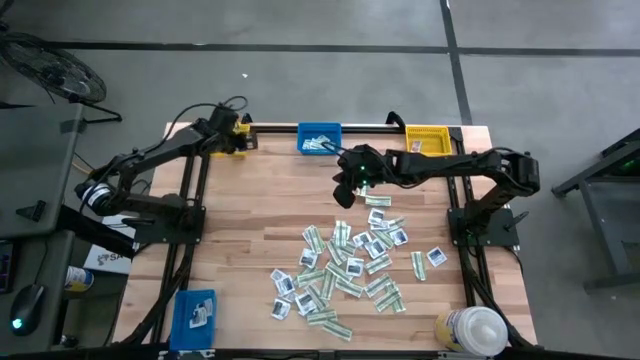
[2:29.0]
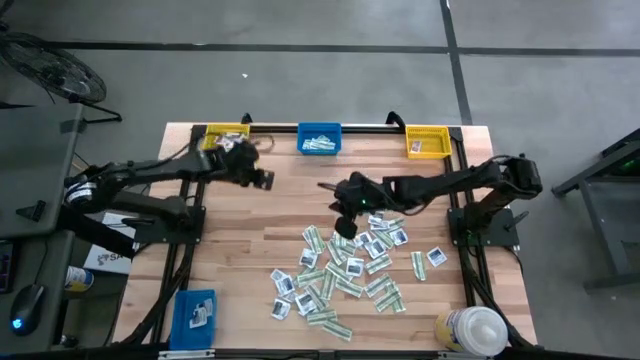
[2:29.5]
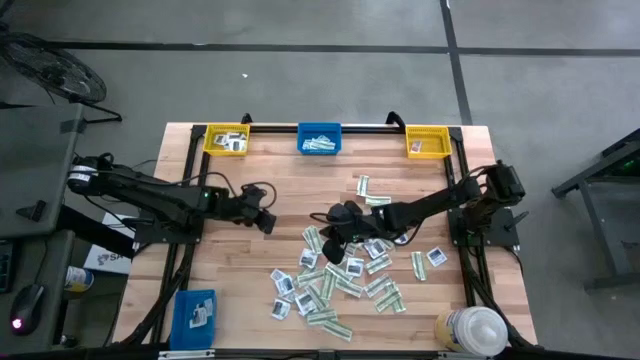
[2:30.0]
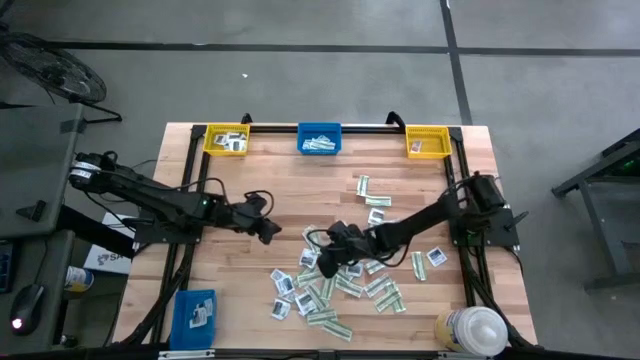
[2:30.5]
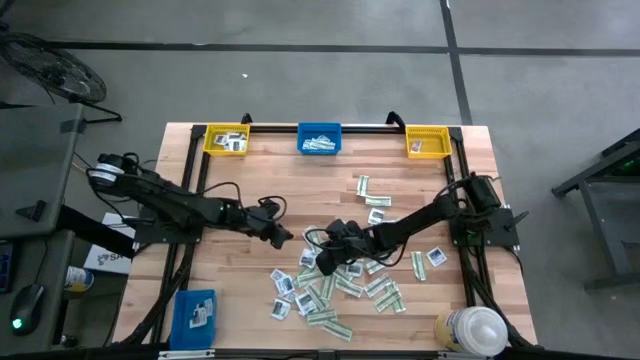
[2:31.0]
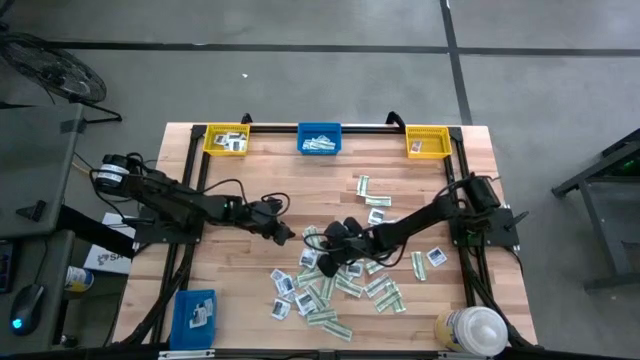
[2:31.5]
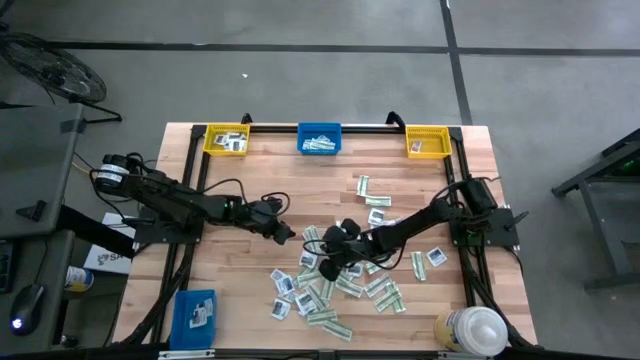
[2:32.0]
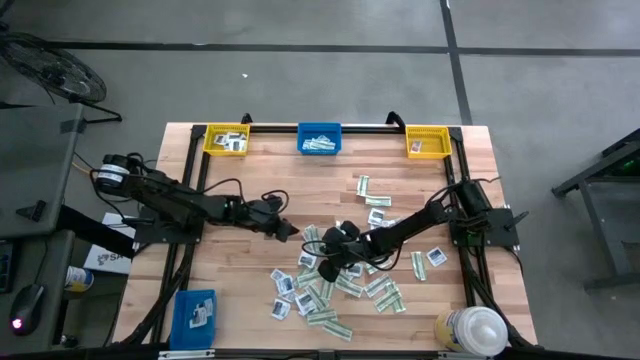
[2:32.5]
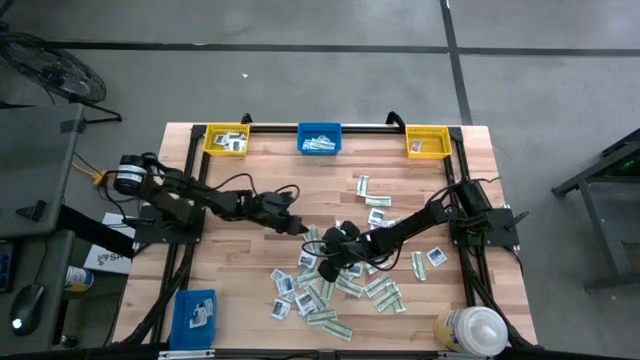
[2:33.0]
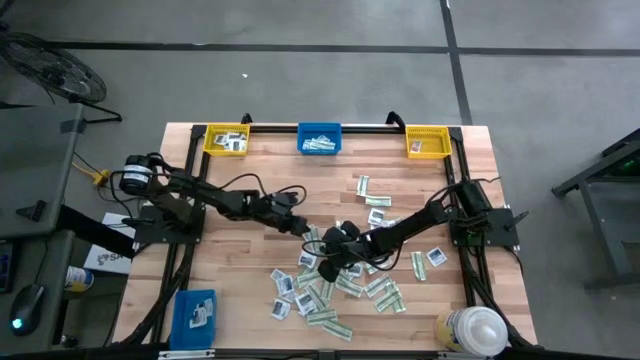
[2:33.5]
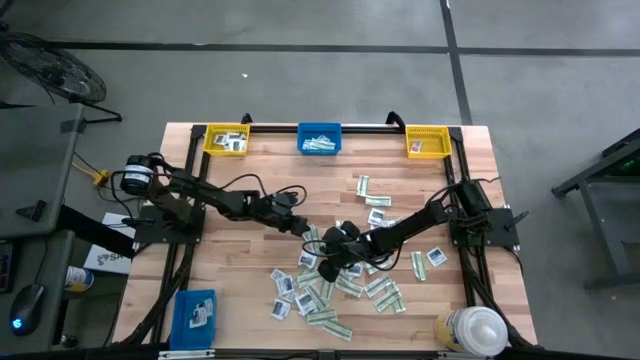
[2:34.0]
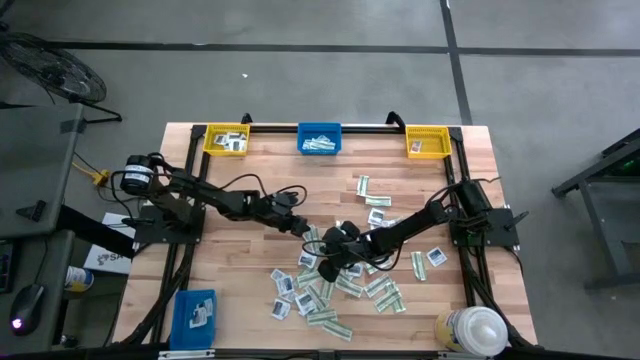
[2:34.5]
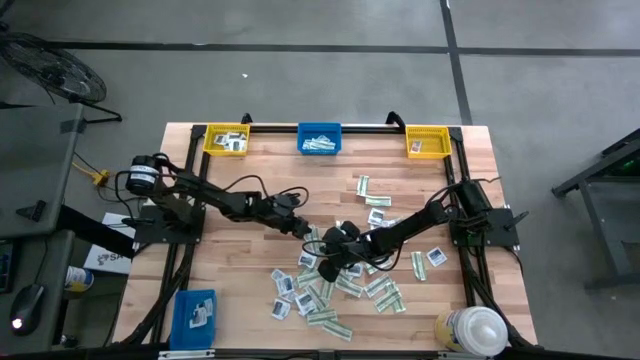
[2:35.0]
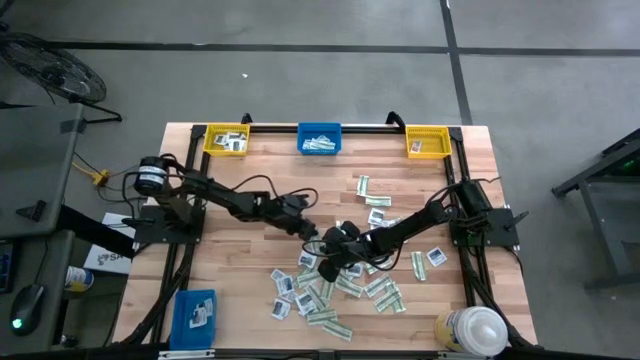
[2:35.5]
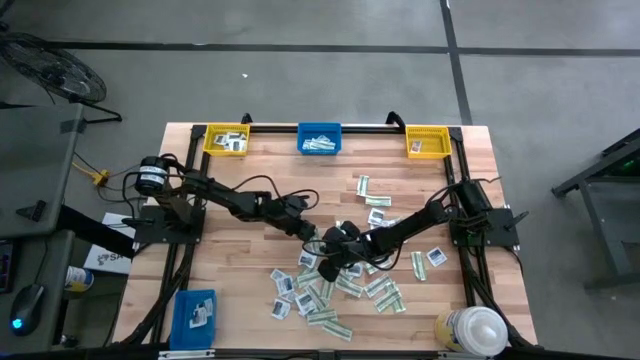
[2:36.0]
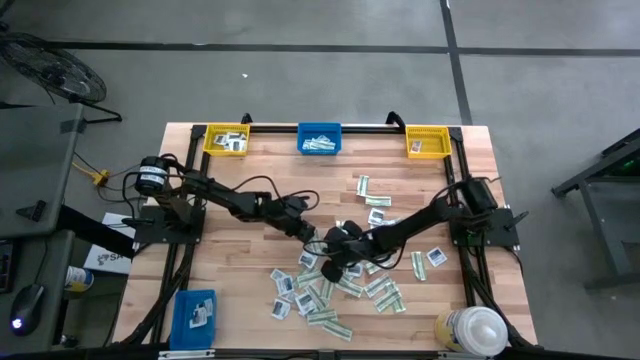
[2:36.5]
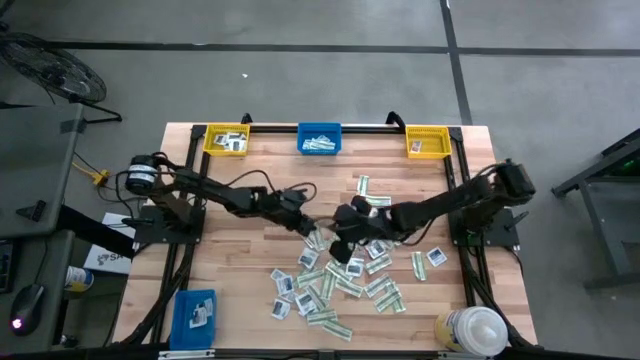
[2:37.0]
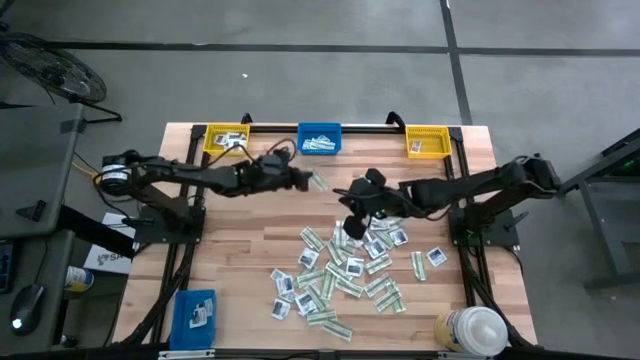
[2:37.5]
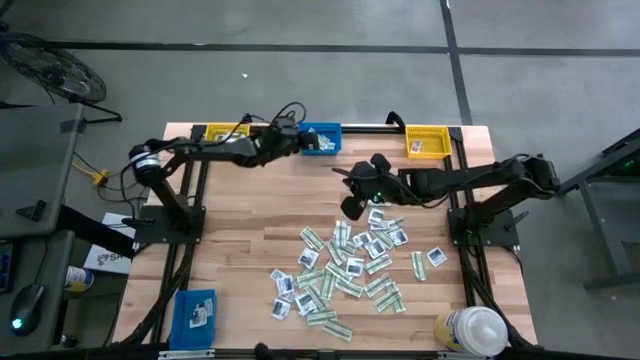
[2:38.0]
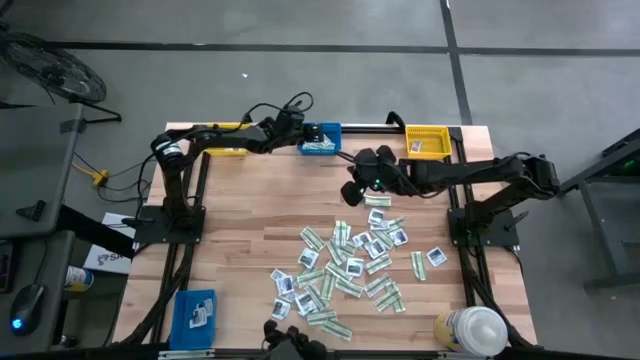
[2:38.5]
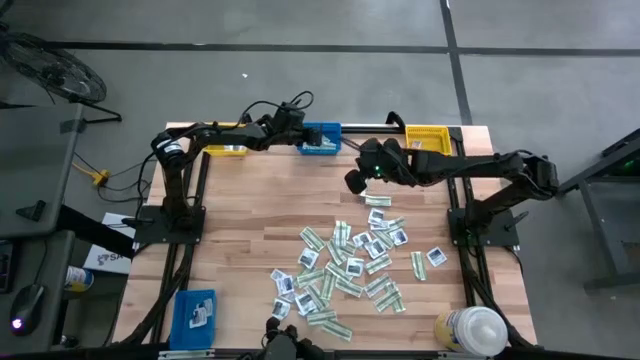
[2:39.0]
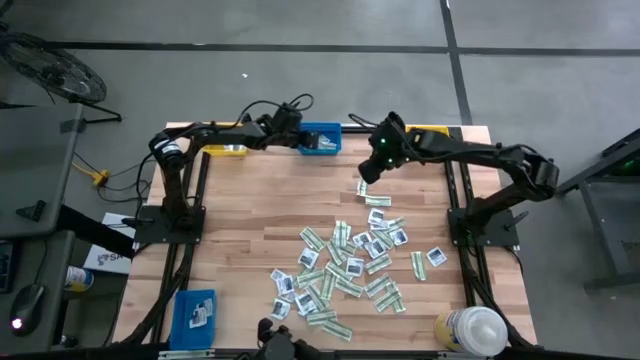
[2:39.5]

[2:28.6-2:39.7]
Task: Pick & Place First Aid Supplies
Put the green bandage pack into the top blue bin

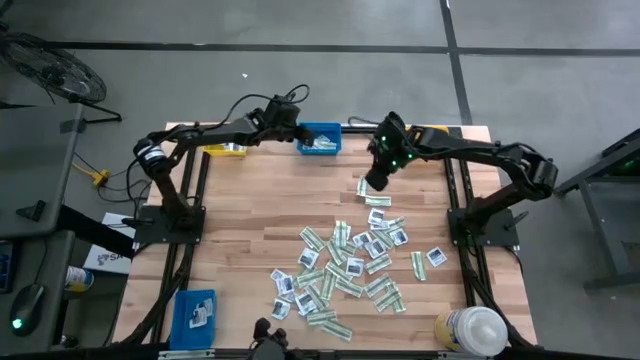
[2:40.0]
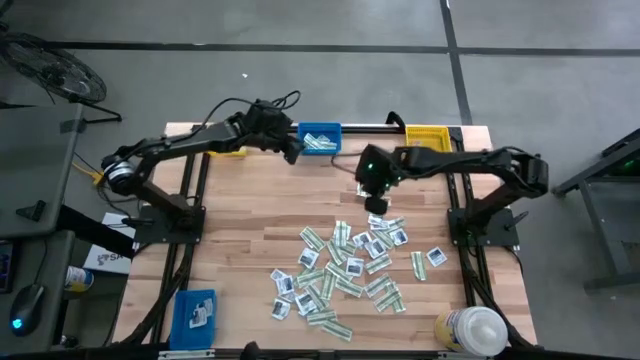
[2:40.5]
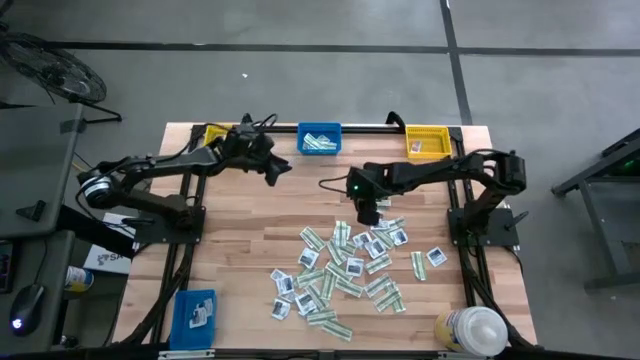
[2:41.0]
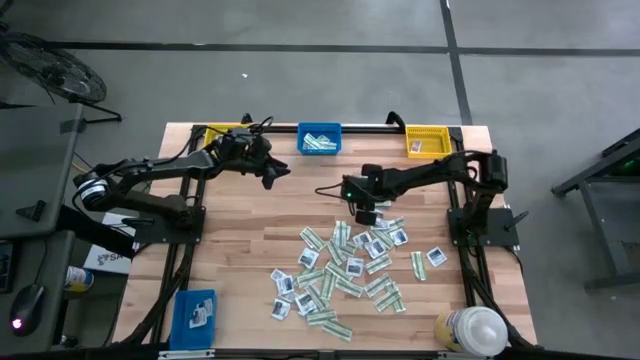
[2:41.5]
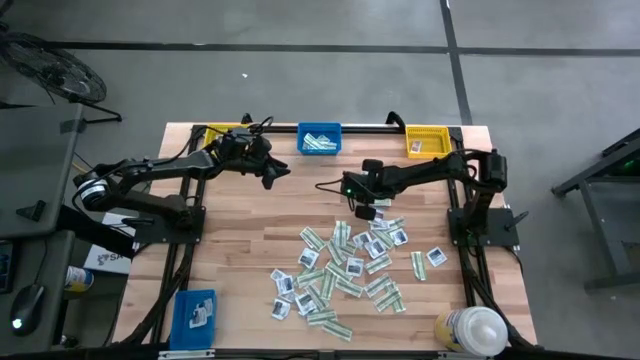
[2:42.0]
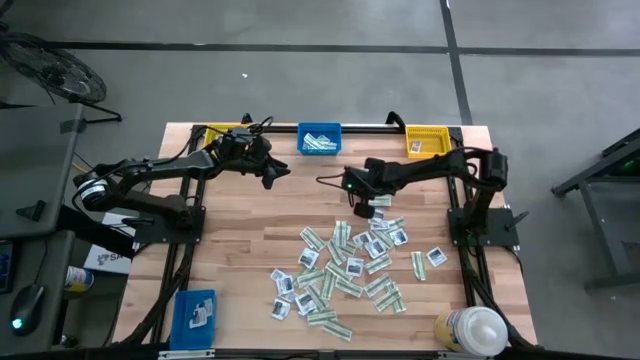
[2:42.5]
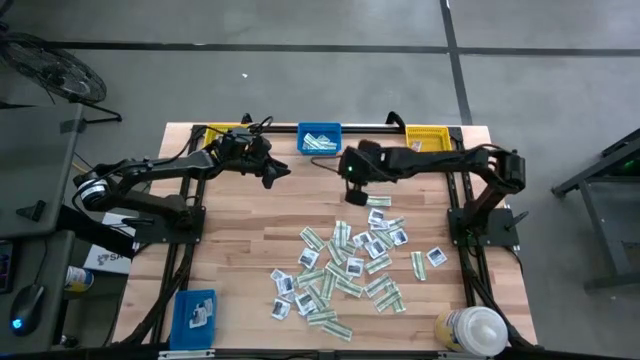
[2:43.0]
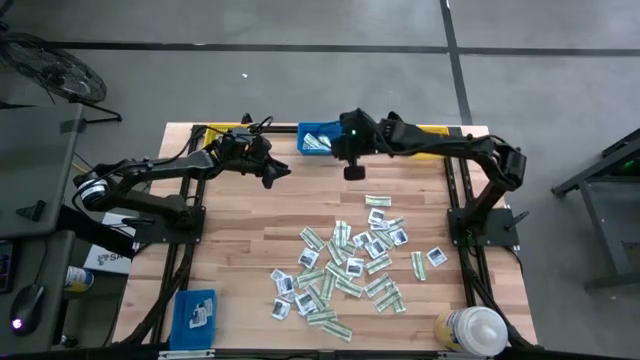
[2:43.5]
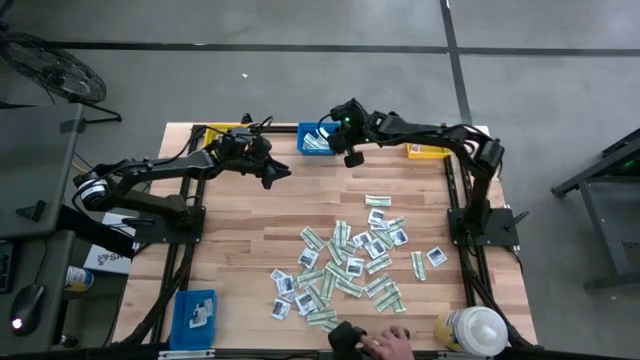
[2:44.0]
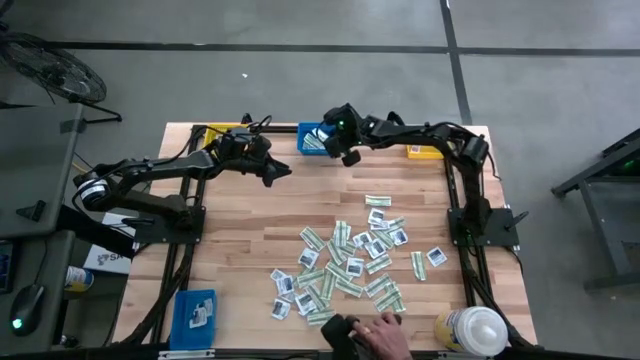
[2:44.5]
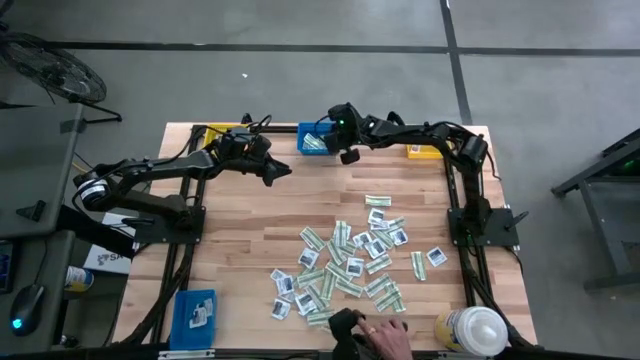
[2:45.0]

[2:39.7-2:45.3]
Put the green bandage pack into the top blue bin

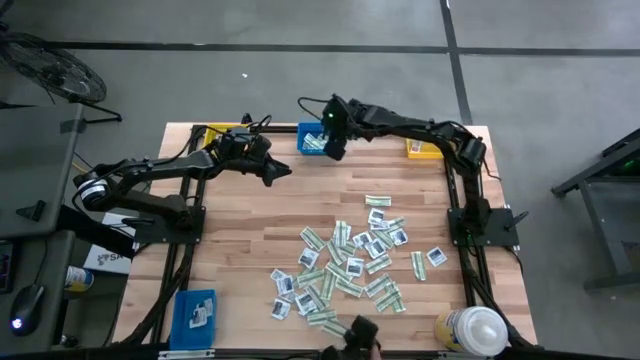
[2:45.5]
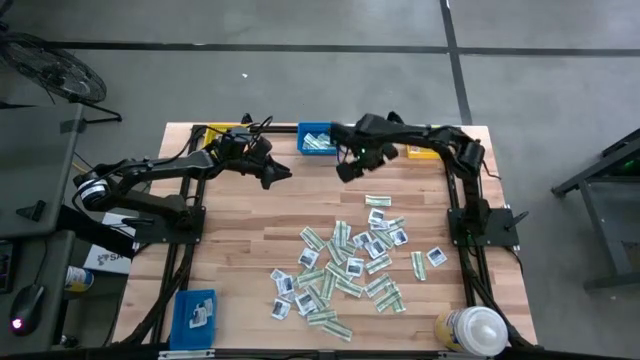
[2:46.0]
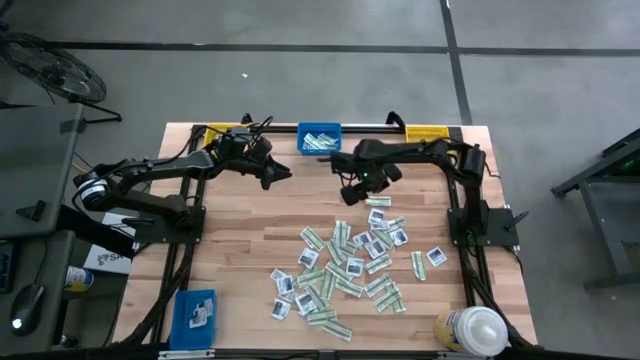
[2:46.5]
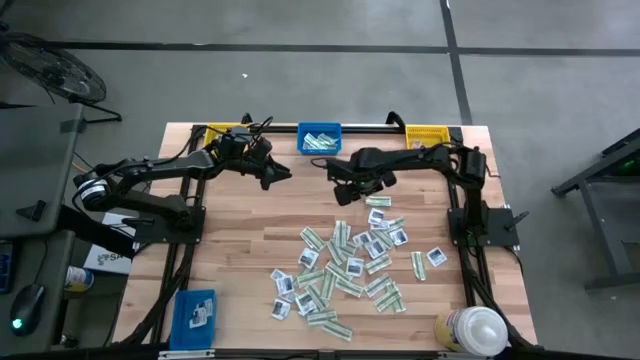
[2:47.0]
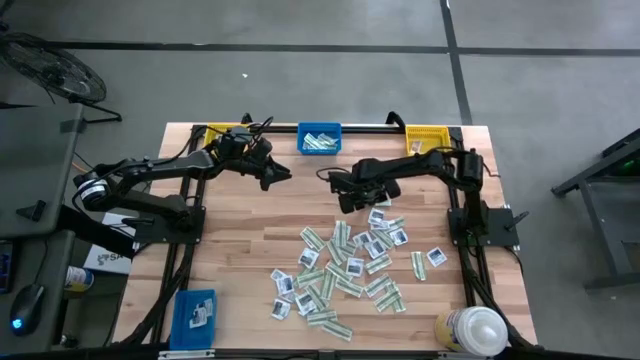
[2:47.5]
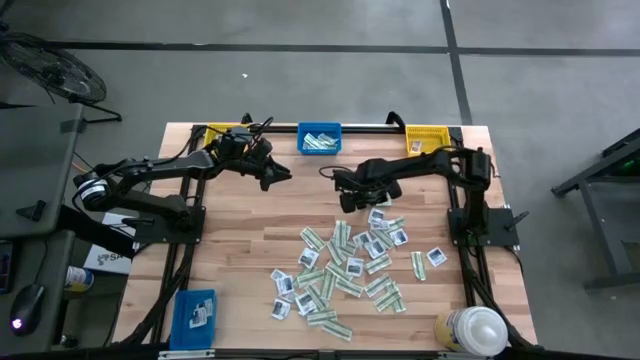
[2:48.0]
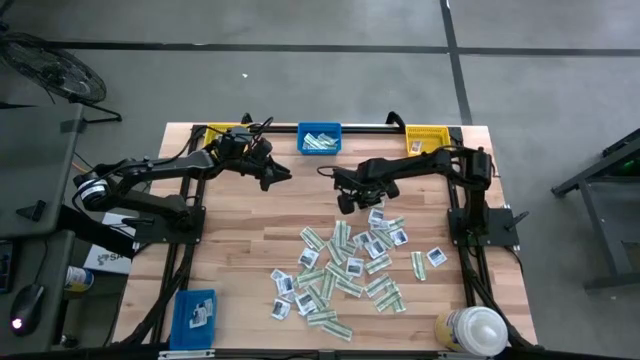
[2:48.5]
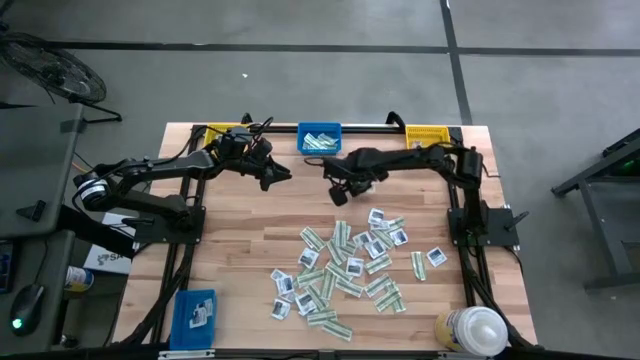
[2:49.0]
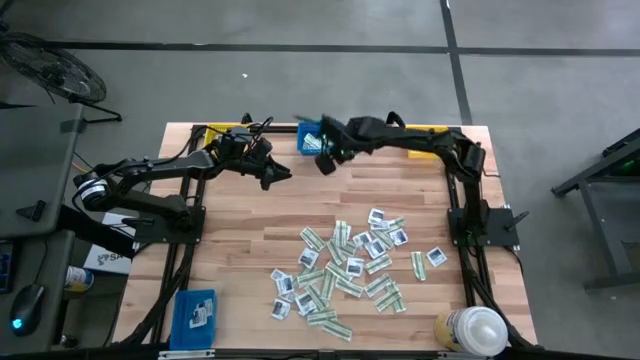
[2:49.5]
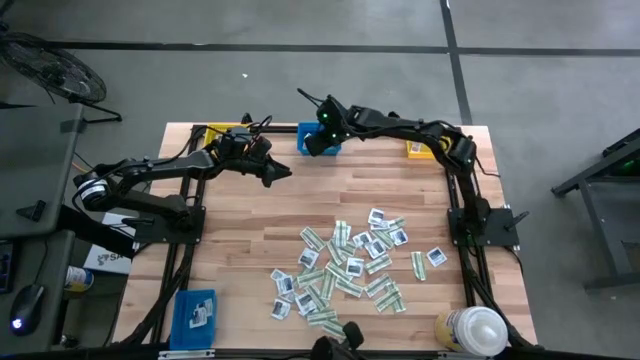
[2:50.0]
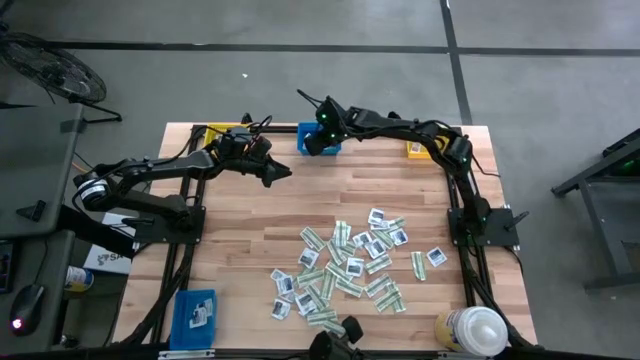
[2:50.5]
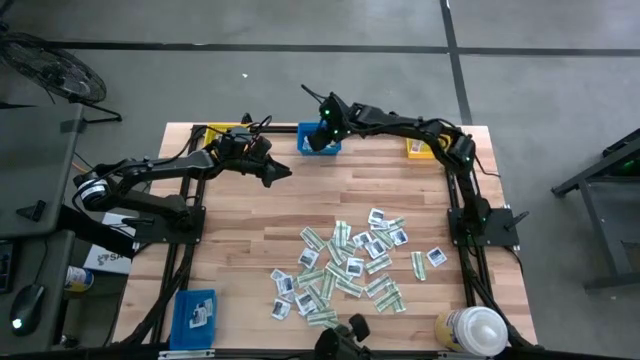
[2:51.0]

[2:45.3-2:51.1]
Put the green bandage pack into the top blue bin
